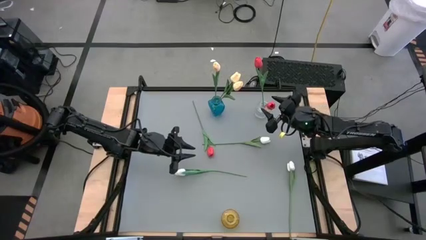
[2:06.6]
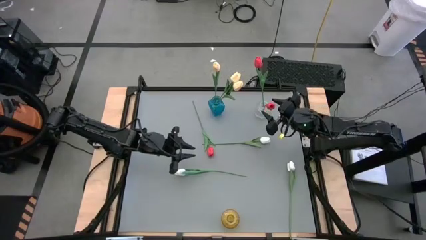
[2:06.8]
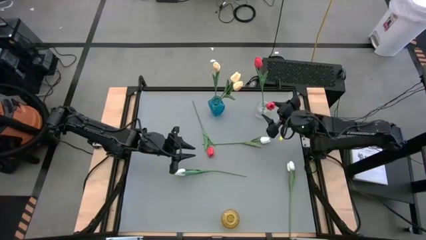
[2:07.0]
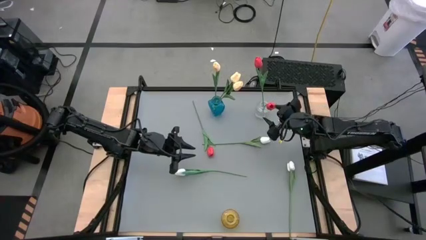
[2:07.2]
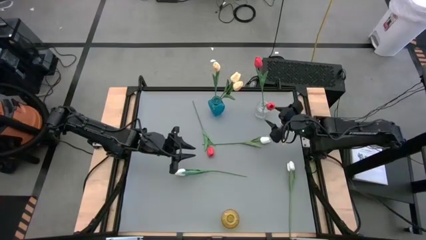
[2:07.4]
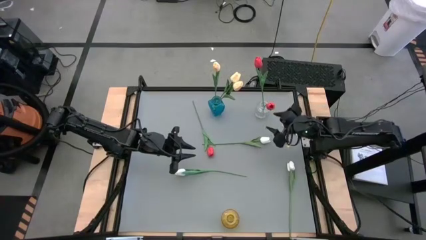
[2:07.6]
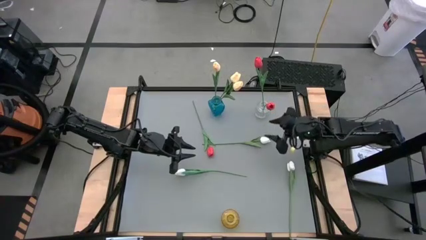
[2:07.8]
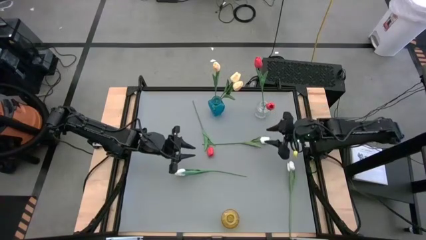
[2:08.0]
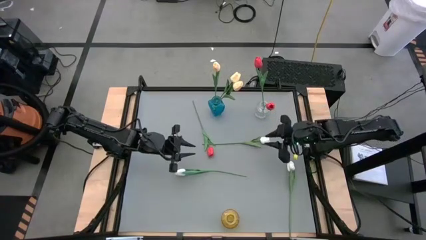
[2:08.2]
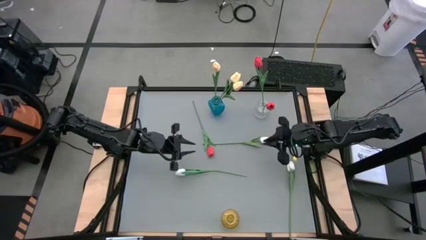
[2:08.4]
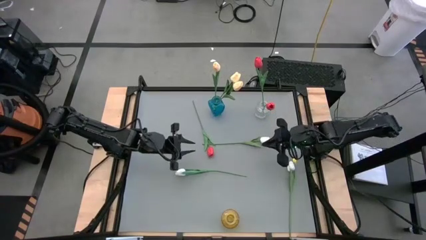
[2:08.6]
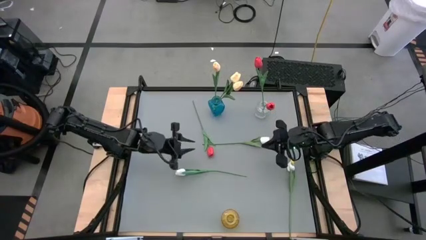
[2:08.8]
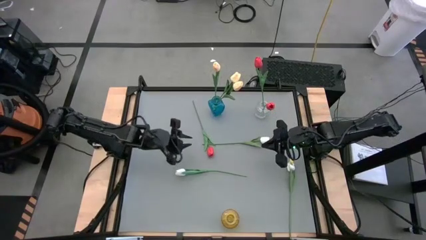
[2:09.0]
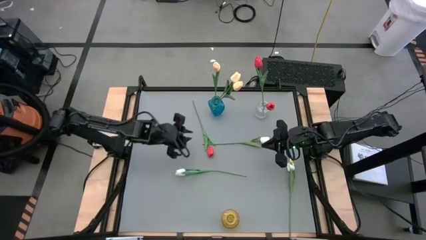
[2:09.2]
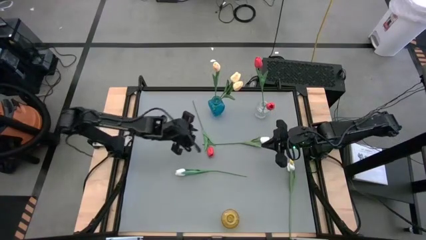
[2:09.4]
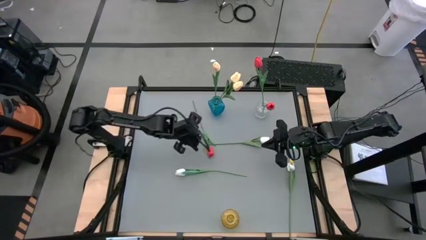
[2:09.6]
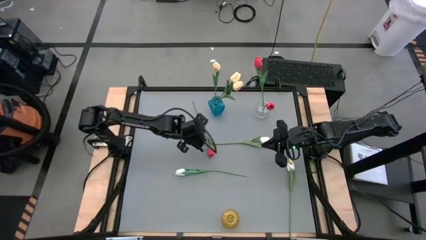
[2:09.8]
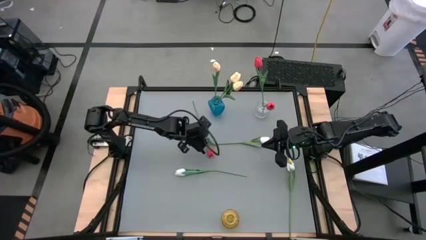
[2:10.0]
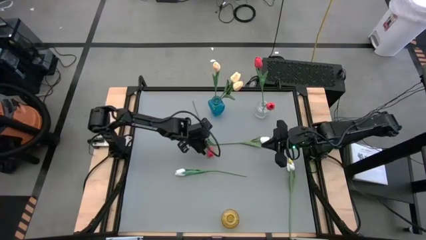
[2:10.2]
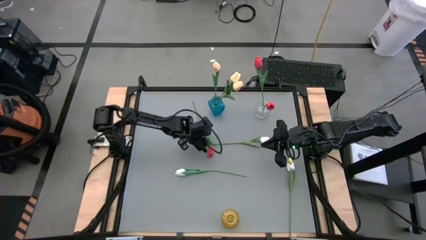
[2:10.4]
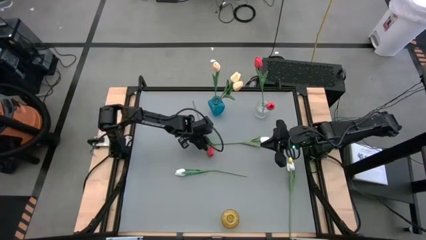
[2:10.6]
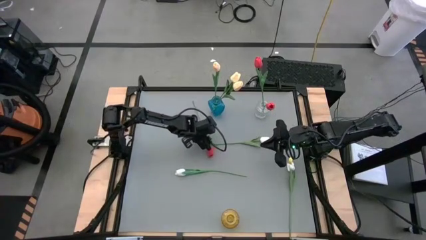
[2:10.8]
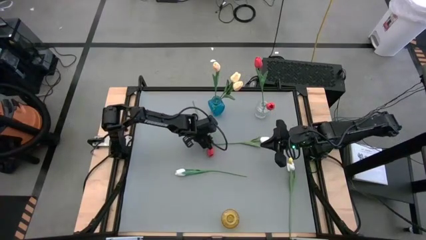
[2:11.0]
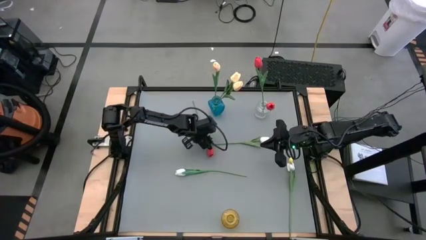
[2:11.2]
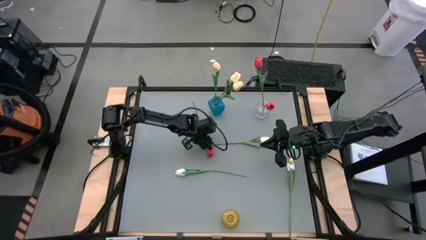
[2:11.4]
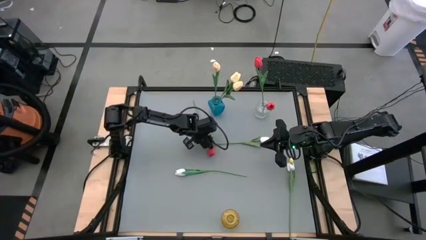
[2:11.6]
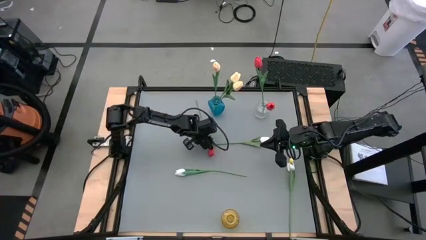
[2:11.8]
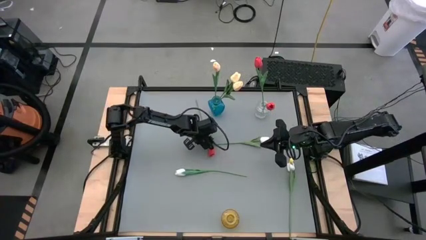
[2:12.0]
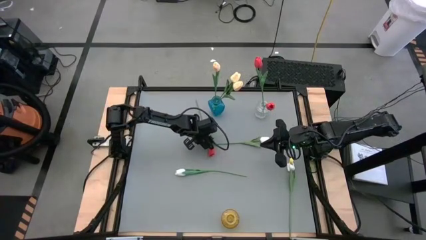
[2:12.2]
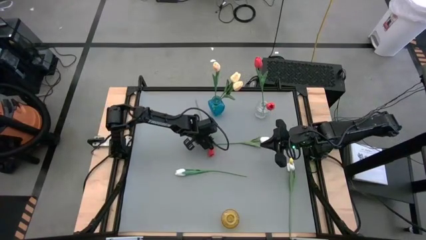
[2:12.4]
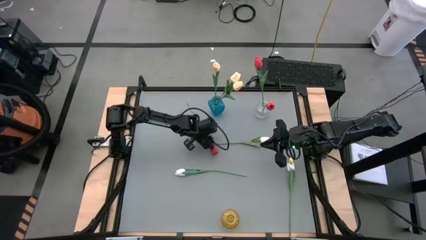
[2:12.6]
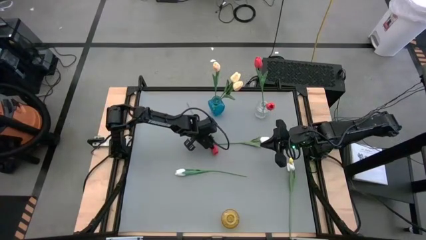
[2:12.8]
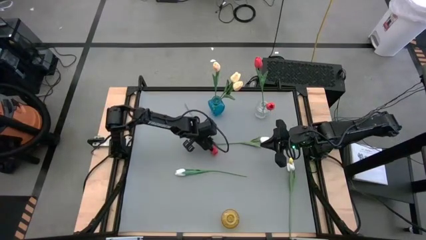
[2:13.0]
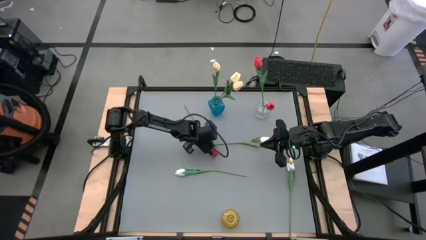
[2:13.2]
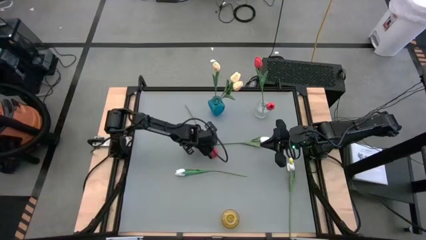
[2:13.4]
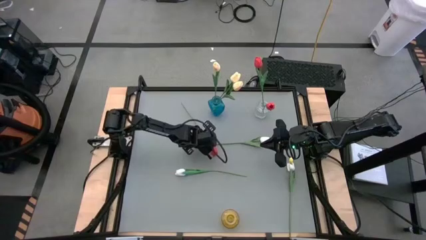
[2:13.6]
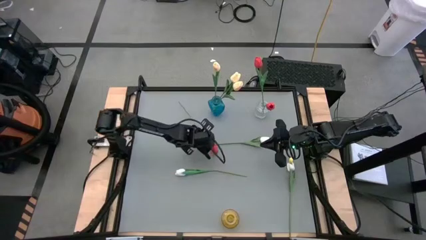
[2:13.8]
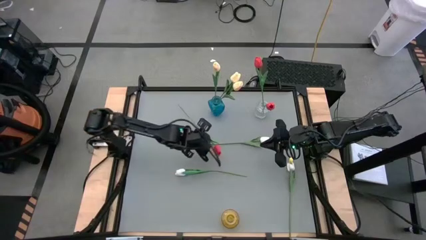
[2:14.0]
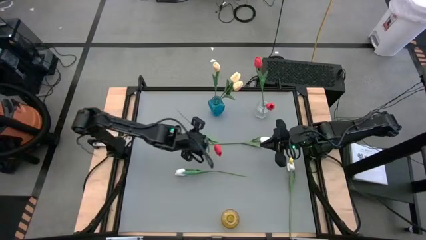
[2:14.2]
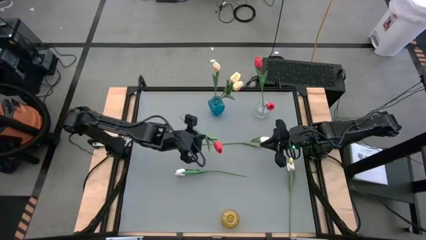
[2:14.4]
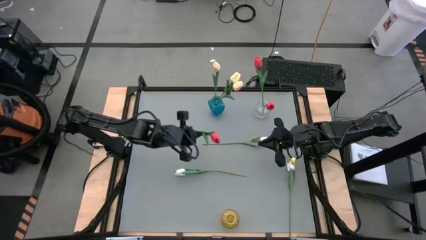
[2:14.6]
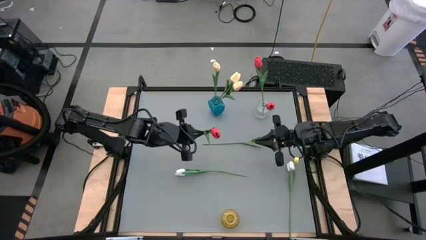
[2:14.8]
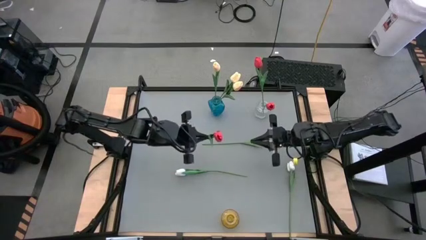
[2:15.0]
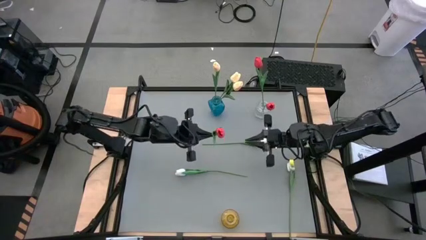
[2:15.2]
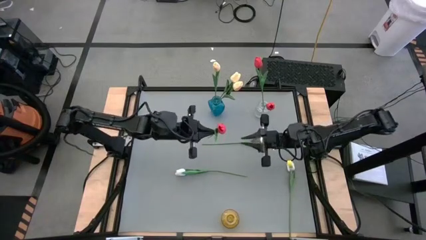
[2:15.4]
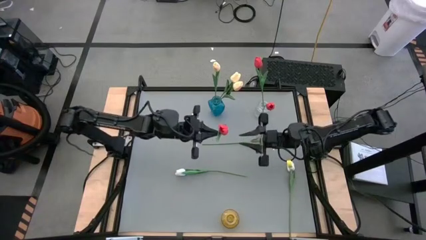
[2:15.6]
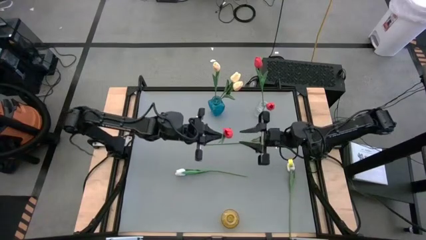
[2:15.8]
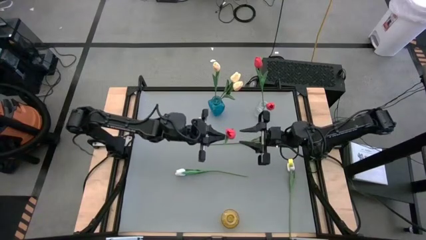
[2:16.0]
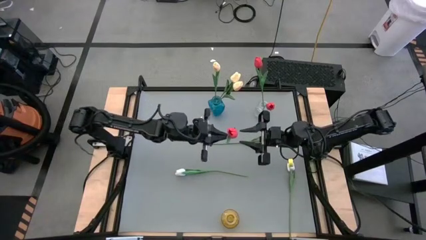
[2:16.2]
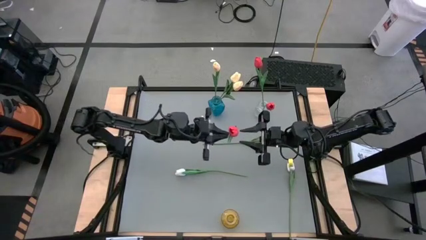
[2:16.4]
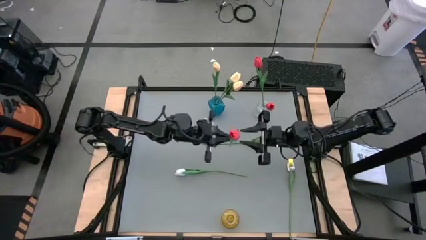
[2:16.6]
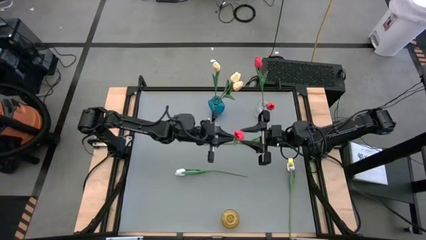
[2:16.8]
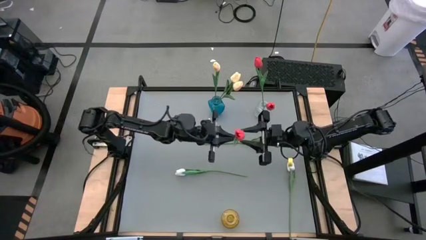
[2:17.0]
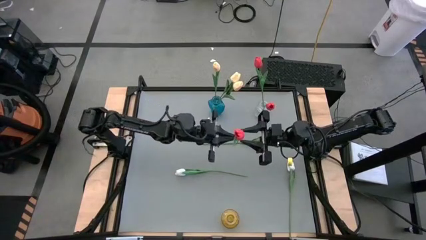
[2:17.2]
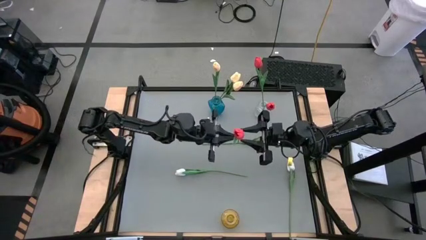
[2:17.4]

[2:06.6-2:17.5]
Task: Sort flowers into vase by color
Put the red flower into the transparent vase

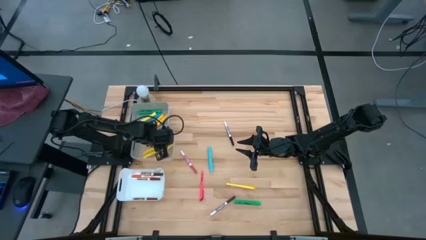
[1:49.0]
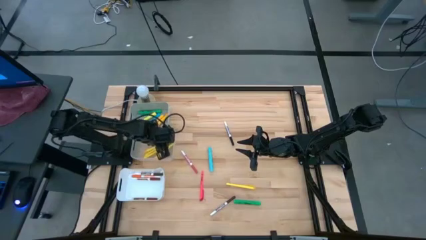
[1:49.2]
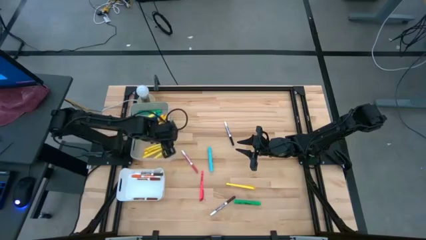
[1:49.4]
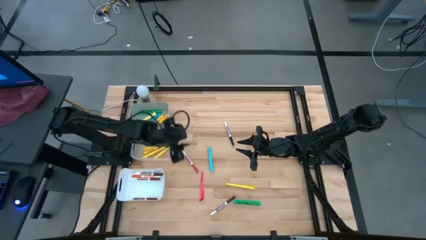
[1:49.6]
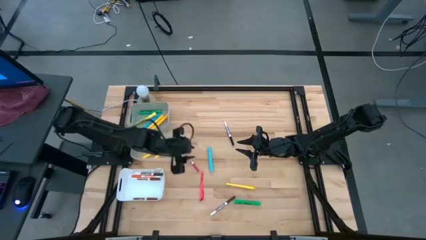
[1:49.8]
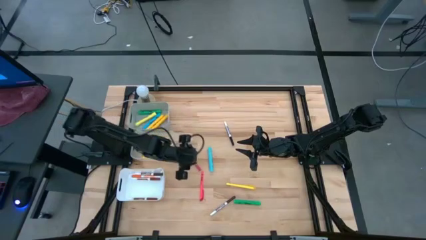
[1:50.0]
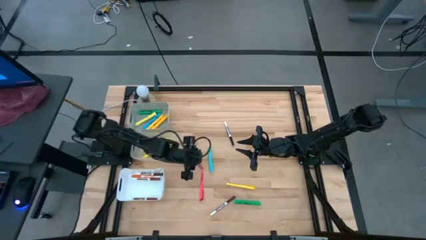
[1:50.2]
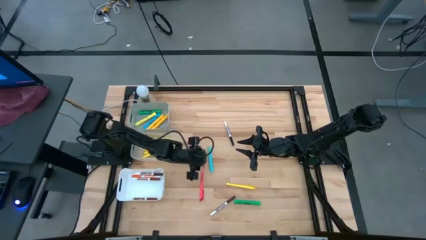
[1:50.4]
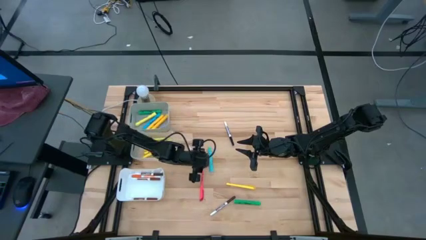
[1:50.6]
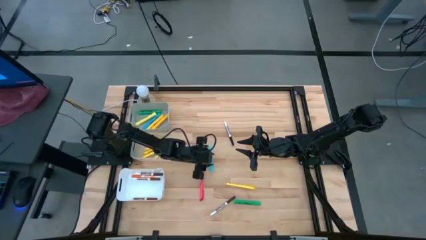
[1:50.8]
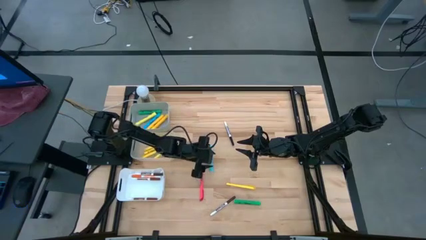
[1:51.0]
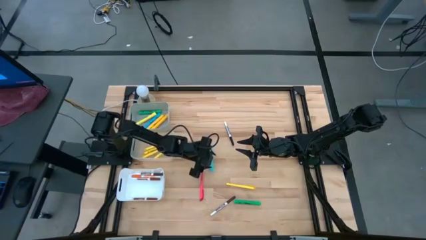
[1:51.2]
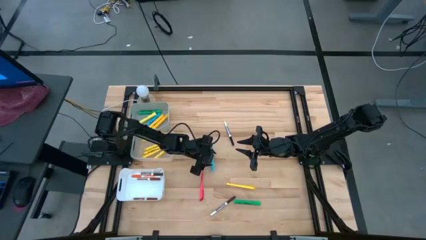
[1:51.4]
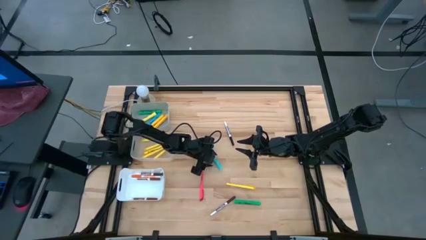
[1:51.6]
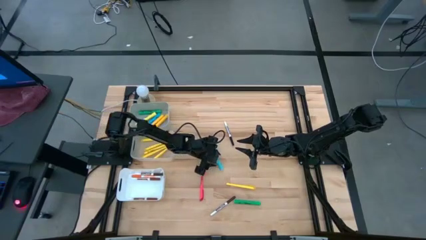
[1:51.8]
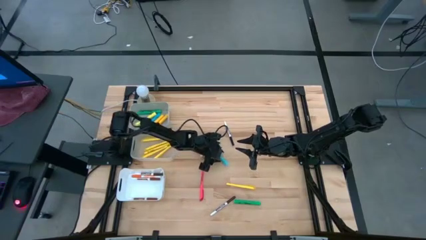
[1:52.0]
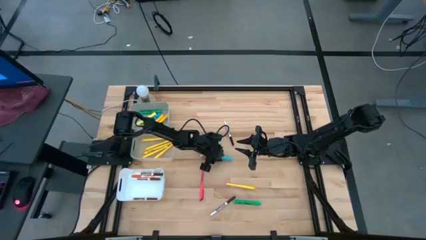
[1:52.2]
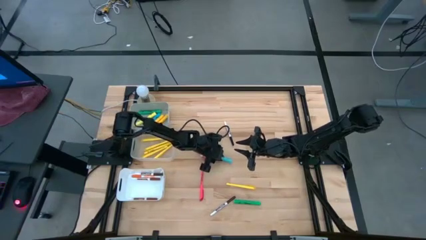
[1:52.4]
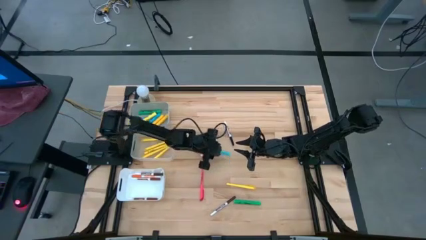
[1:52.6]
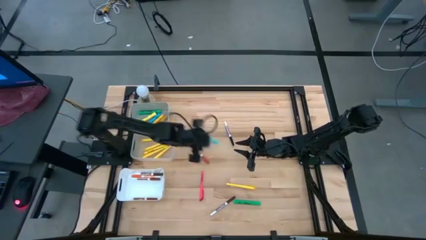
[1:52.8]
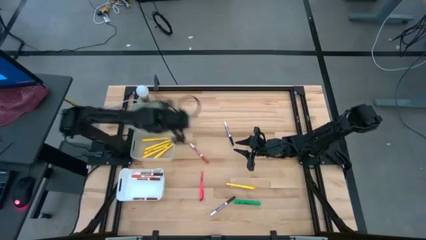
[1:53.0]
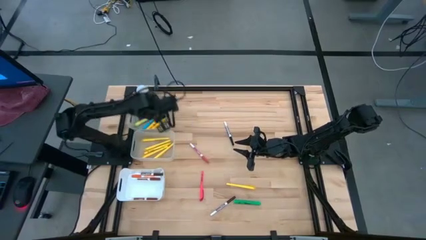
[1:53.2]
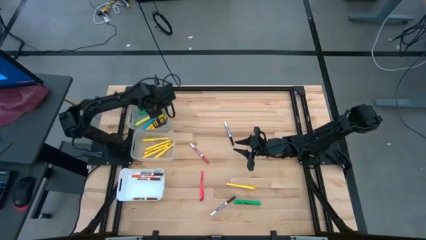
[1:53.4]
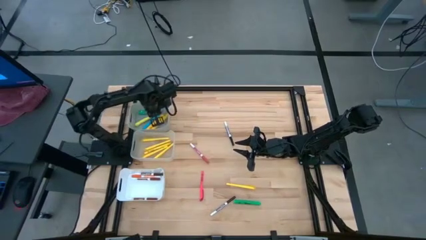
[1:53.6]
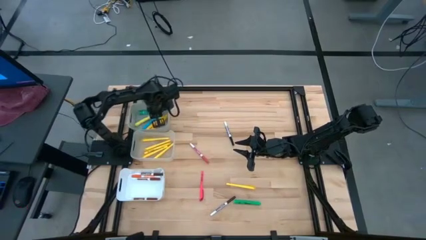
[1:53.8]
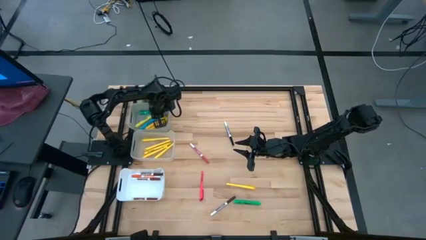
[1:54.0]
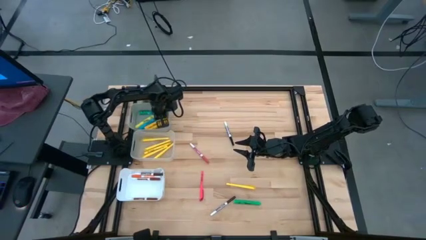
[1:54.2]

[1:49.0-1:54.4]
Task: Pick & Place Markers
Put the light blue highlighter into the gray bin
